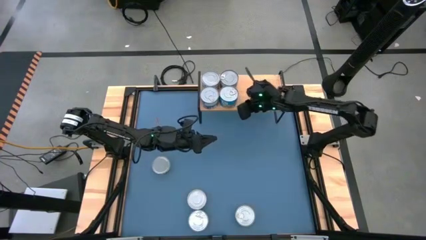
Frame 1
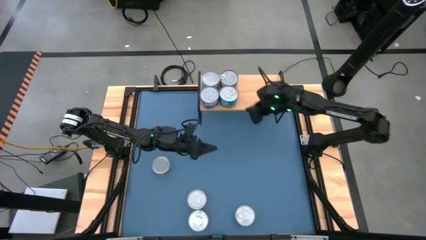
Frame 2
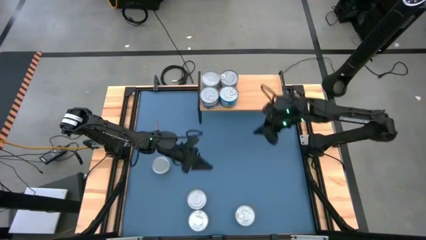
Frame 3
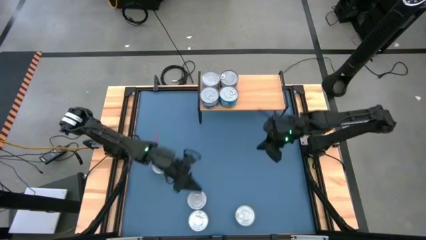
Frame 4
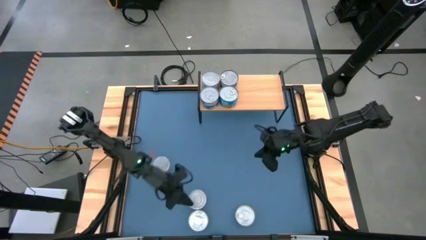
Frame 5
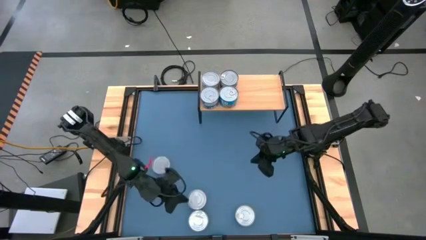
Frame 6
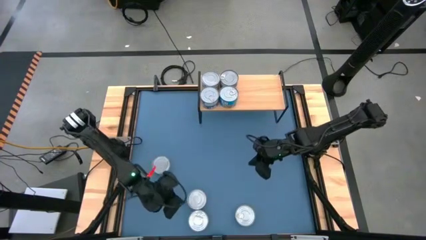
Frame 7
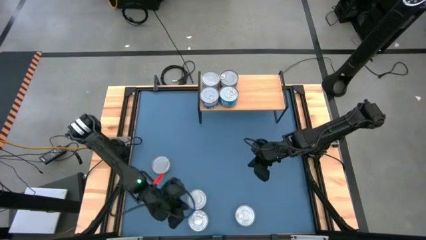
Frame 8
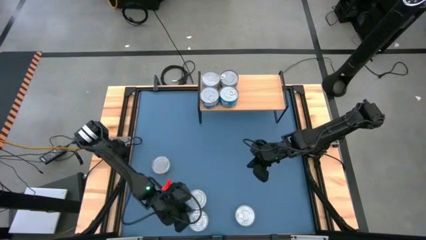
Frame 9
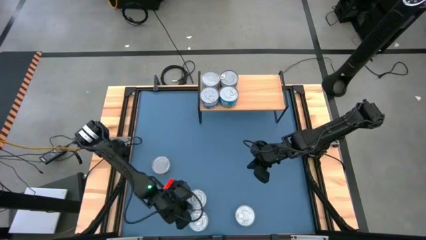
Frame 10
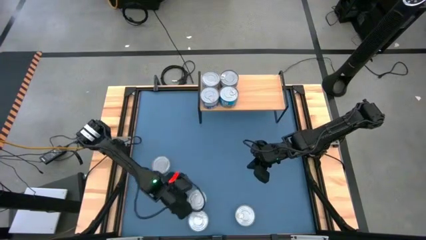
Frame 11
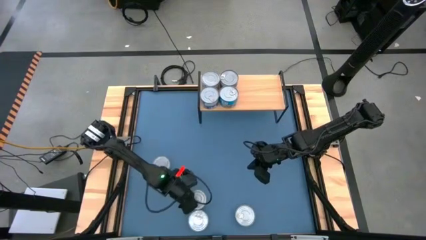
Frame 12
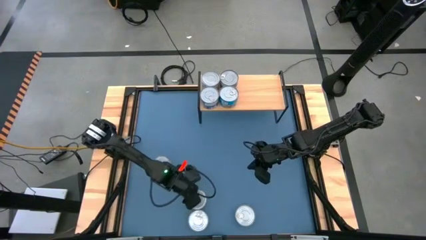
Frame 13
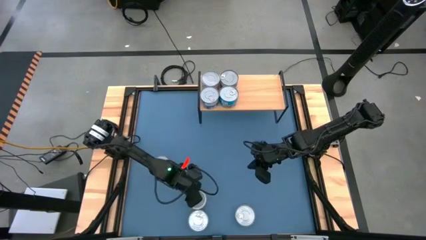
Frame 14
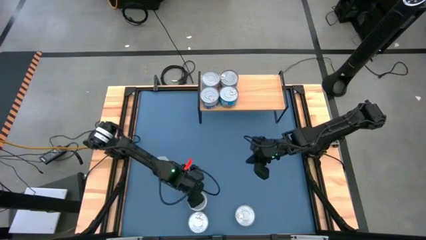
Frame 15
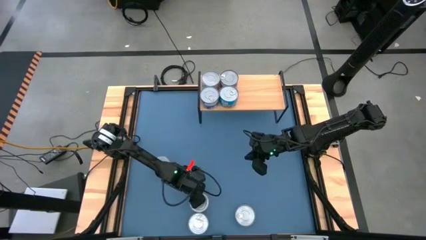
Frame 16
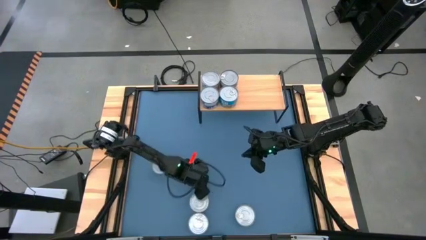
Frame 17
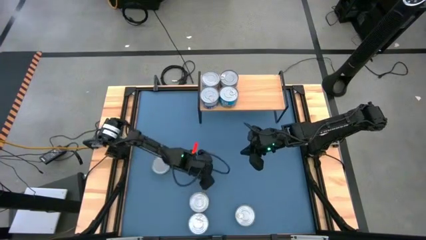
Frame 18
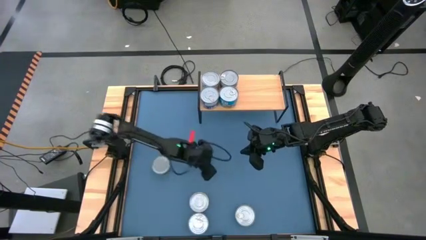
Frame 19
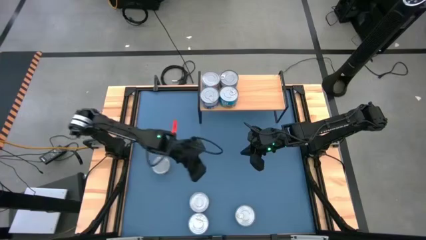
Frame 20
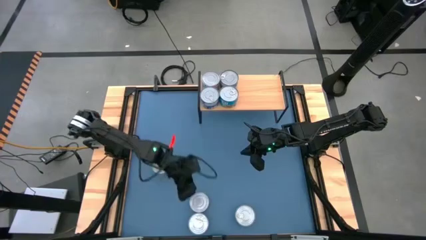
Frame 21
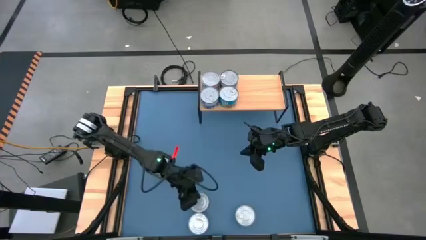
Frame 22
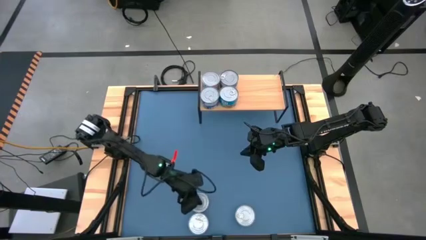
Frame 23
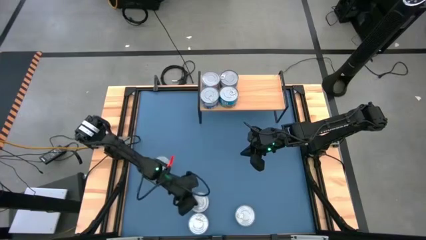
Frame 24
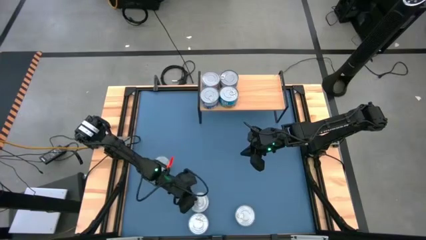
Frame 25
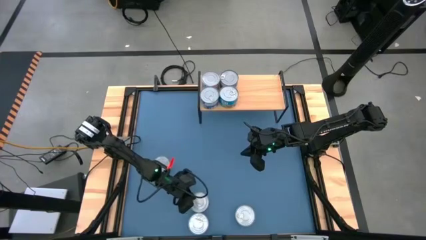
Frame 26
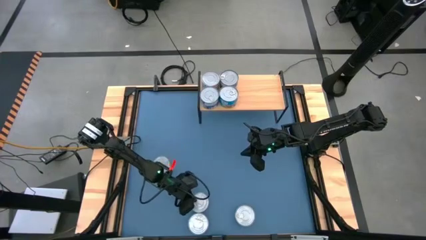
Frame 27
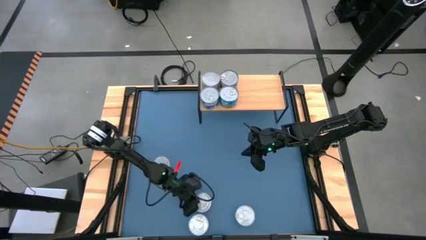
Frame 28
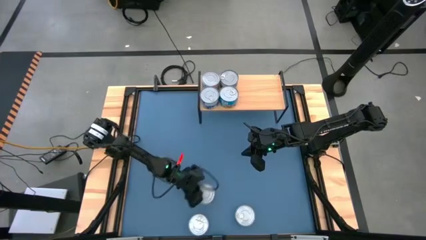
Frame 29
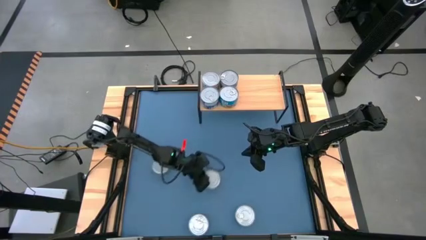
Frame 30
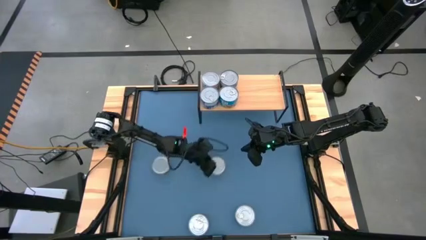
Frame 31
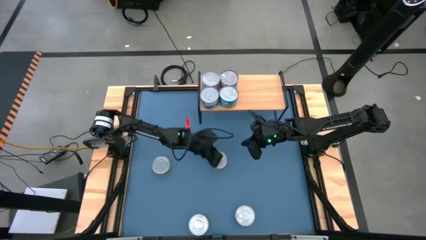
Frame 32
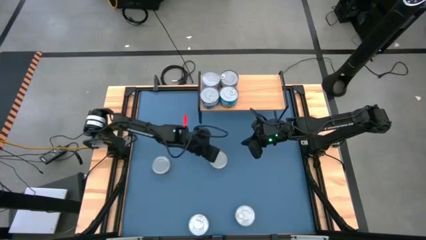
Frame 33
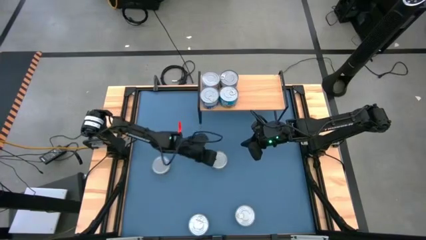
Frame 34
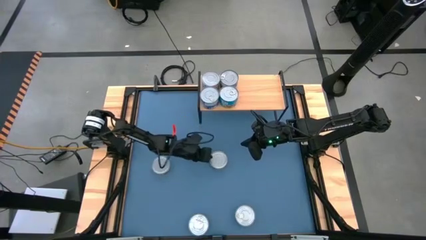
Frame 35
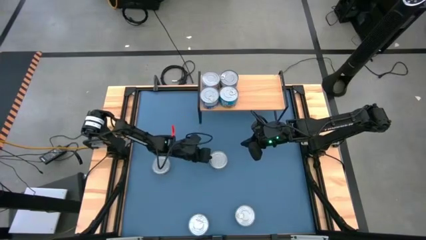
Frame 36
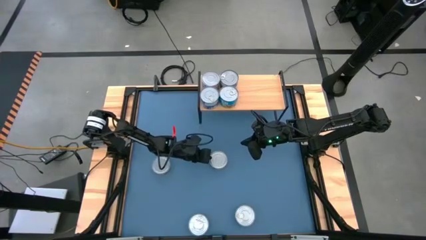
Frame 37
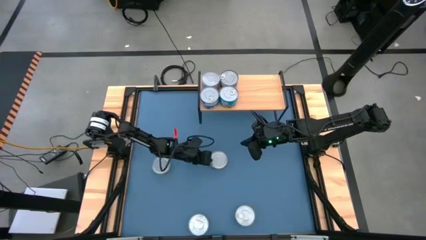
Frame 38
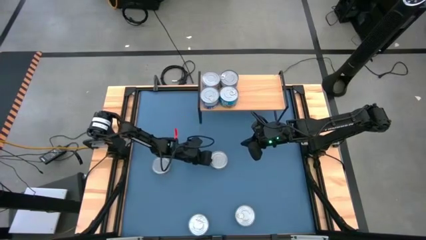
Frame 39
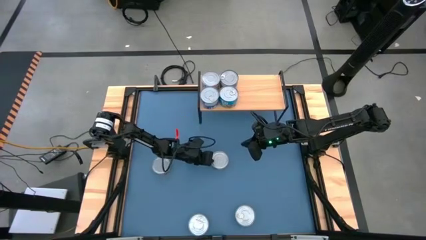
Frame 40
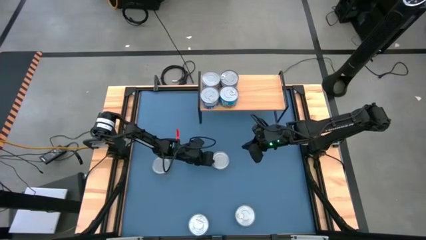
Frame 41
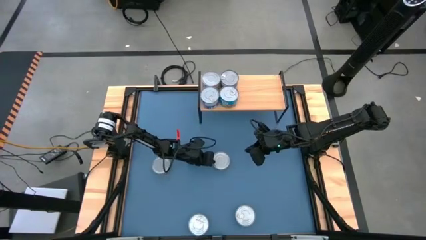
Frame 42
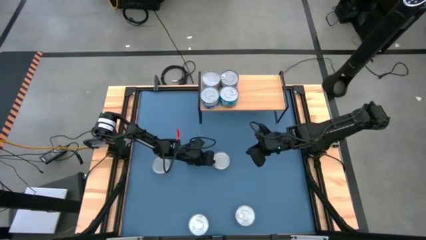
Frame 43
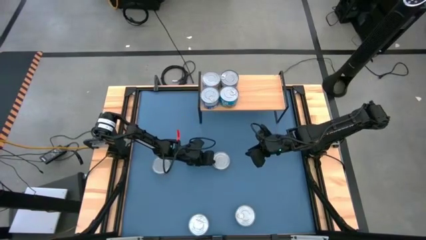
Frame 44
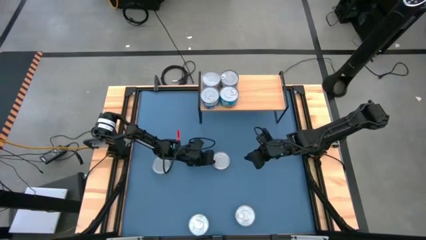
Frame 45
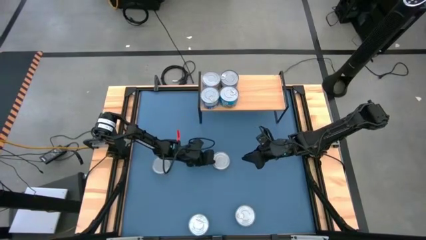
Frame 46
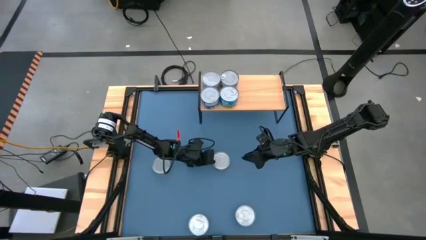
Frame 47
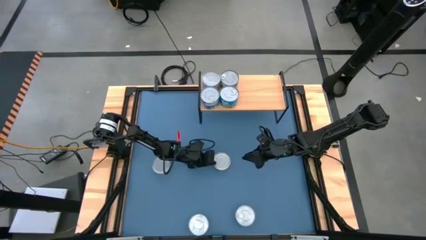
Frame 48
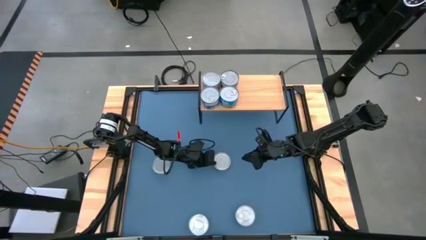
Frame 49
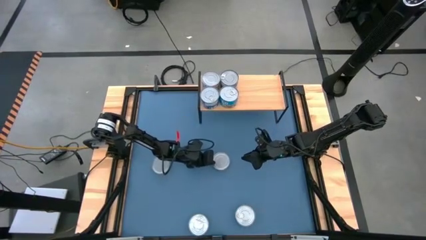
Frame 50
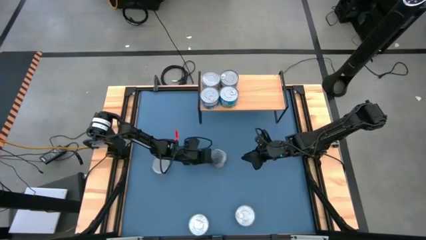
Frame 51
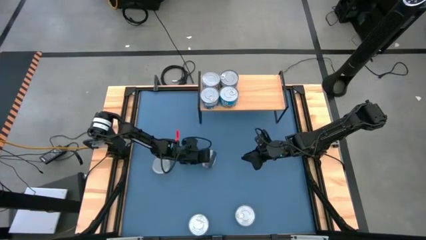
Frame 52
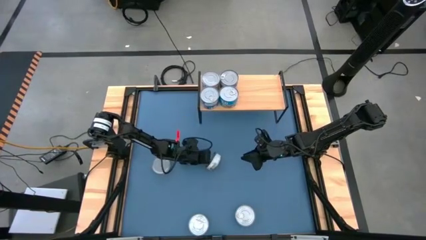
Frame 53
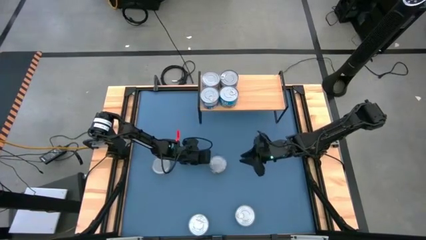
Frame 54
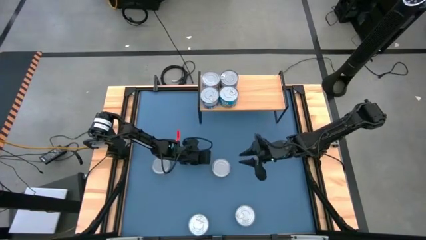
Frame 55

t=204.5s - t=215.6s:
Task: Stack canned seafood by type on shelf
Put the green tuna on the shelf

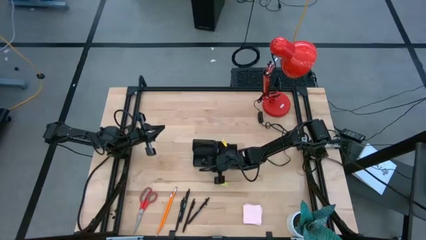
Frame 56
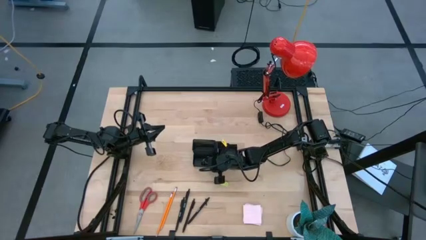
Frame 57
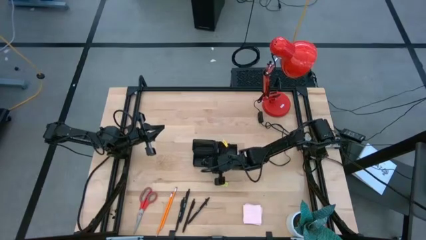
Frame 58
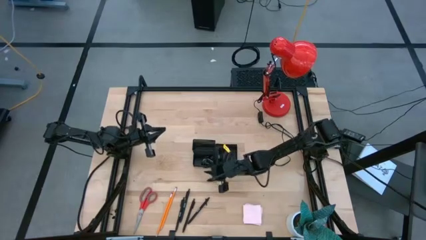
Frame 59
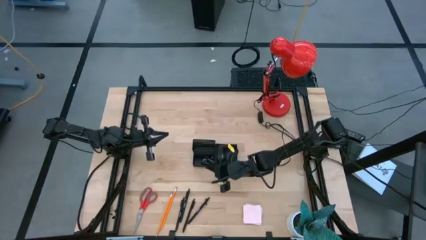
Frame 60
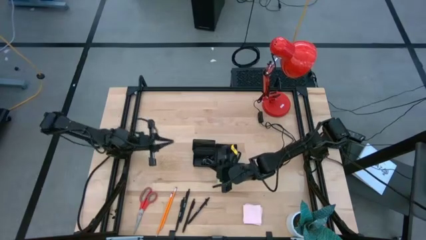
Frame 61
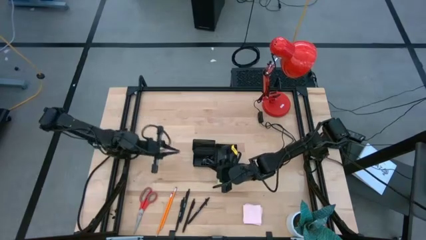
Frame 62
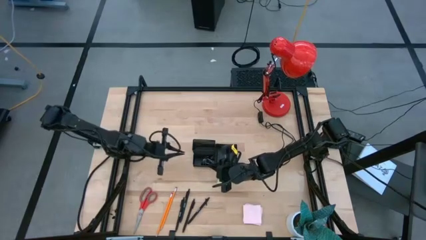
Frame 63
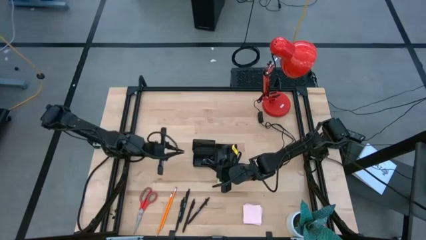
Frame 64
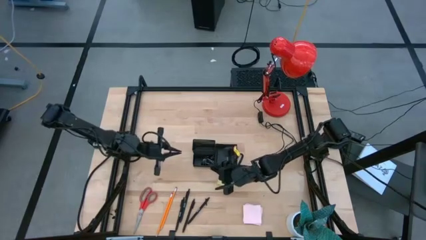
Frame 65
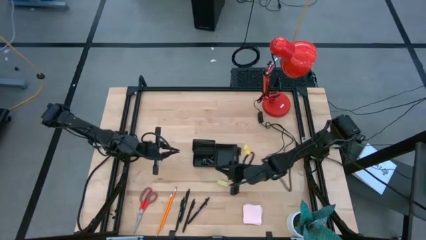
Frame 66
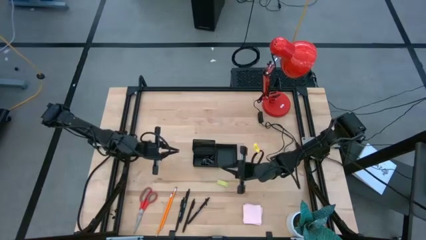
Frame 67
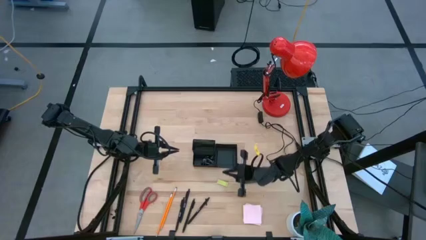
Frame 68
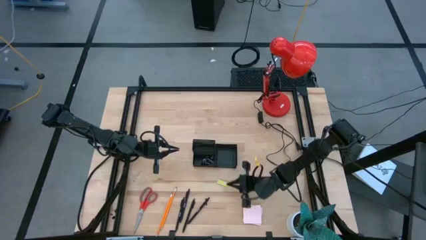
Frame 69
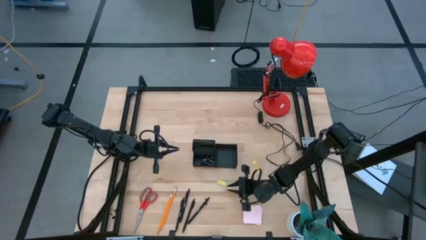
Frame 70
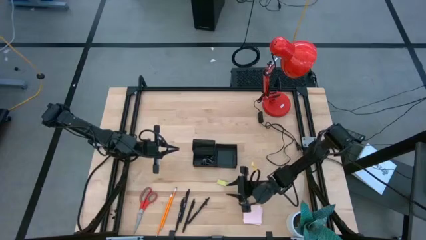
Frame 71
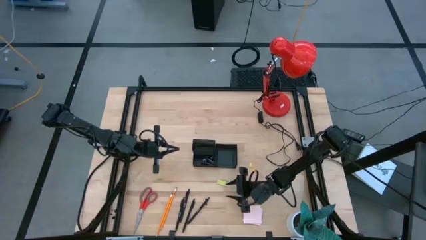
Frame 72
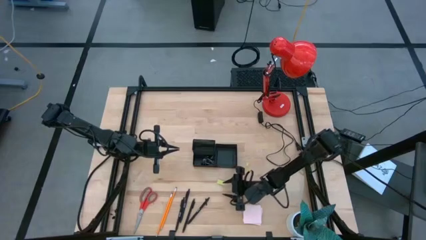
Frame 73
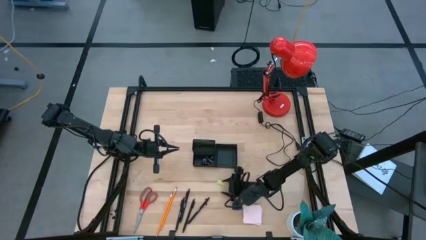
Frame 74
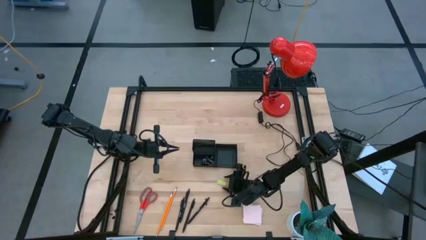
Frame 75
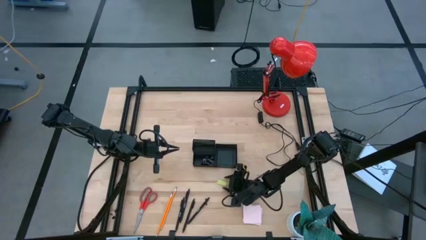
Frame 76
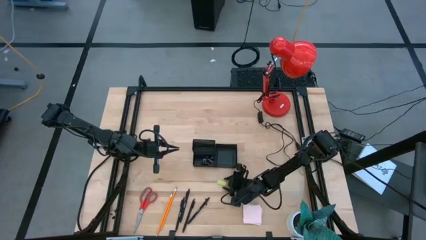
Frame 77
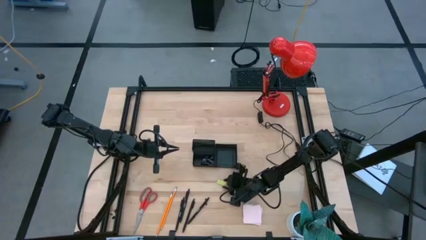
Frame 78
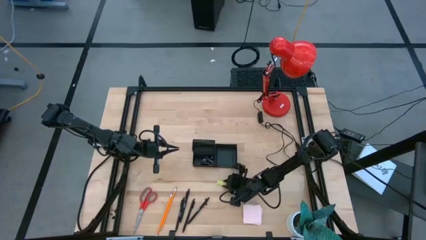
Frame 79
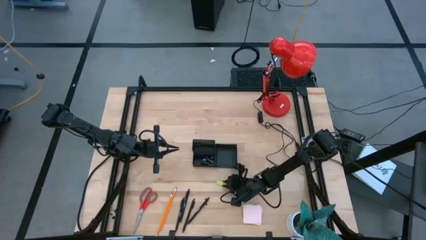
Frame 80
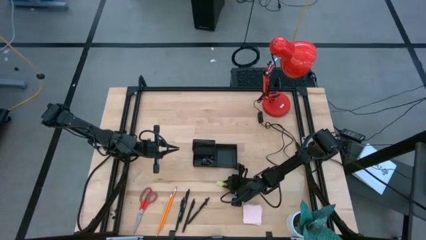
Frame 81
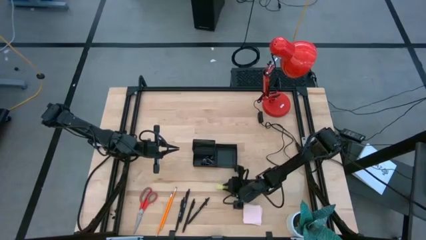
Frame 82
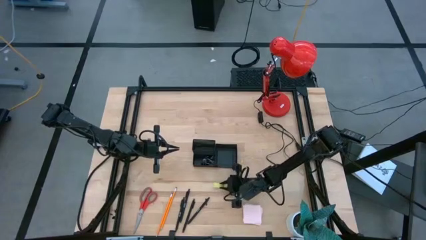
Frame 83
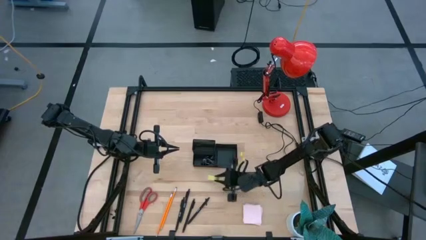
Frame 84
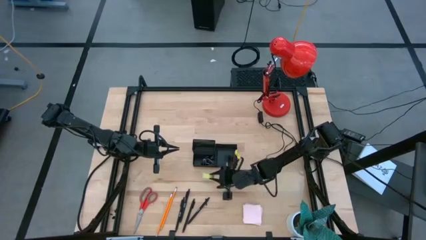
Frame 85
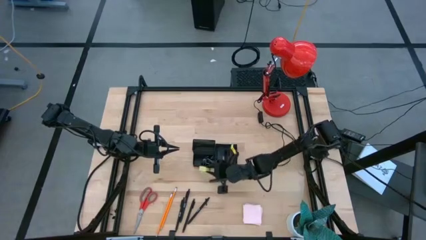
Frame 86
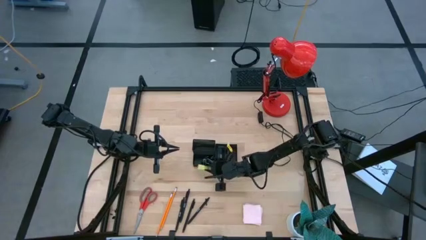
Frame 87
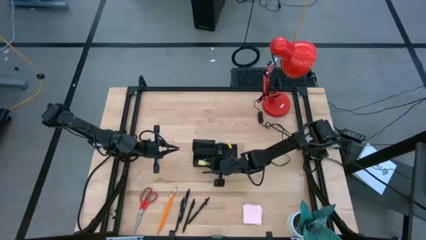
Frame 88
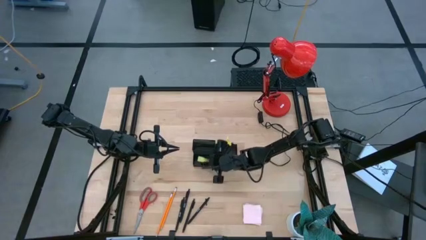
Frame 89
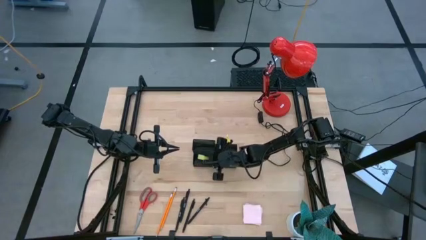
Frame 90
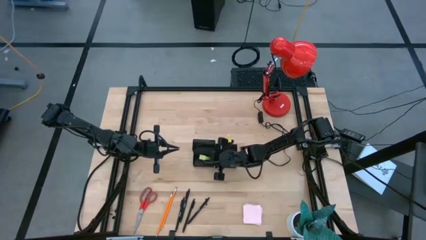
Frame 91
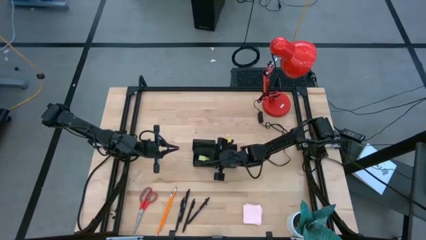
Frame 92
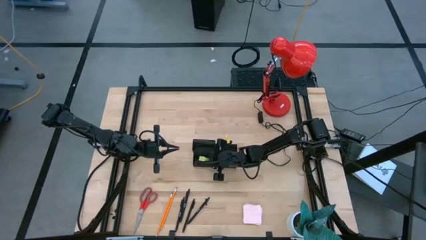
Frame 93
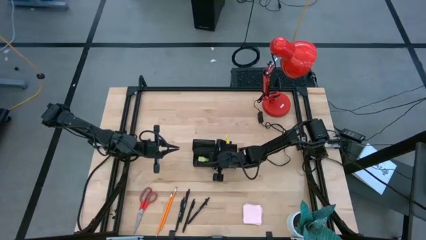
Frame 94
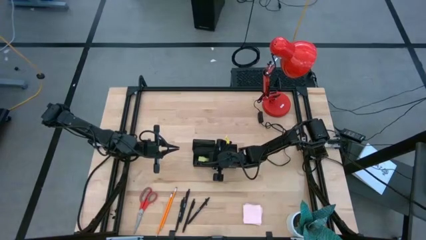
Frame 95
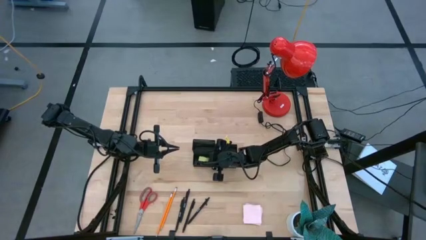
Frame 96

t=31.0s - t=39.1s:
Task: Pick and place office supplies into organizer
Put the yellow eraser into the mesh desk organizer
